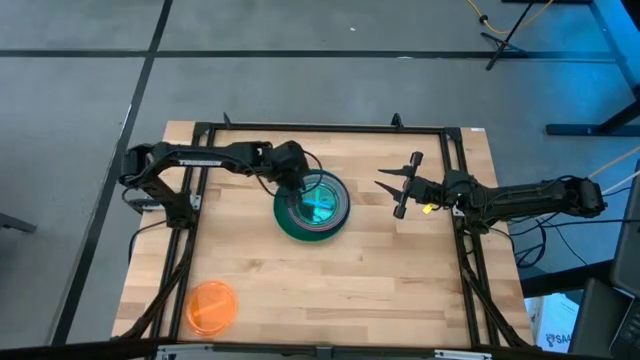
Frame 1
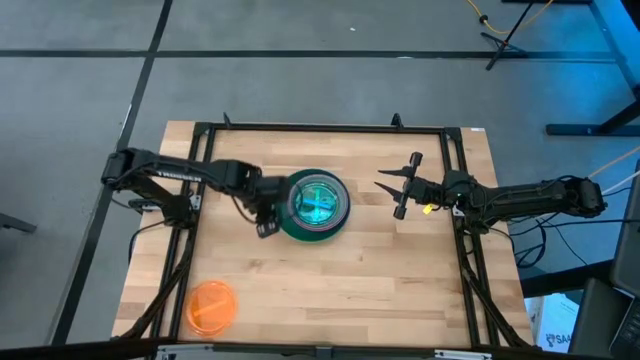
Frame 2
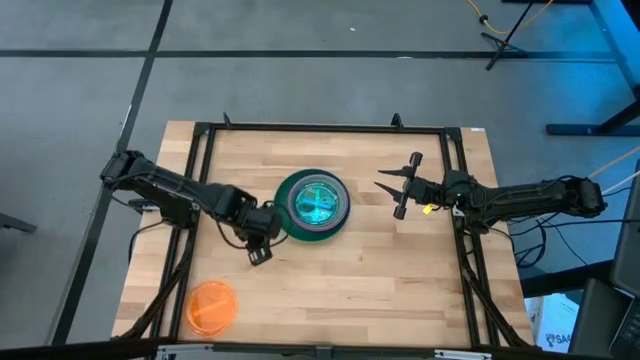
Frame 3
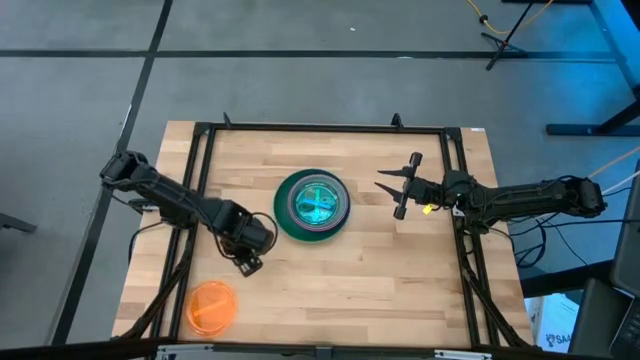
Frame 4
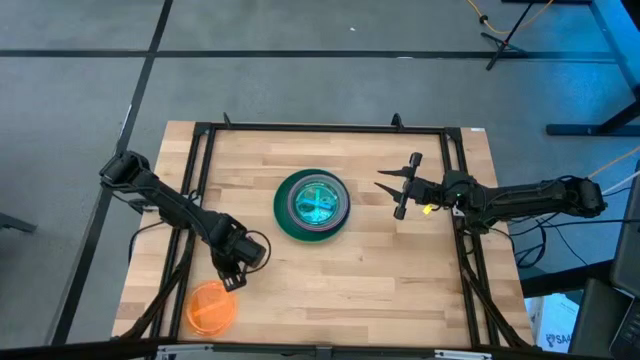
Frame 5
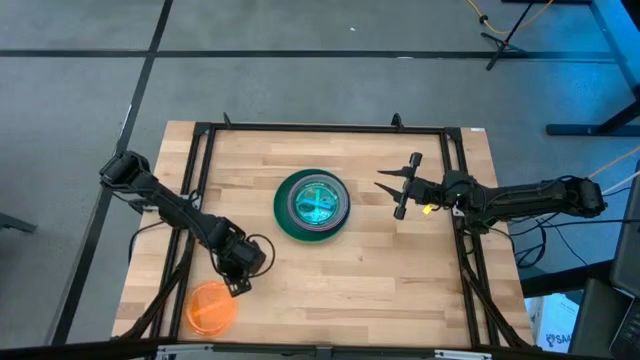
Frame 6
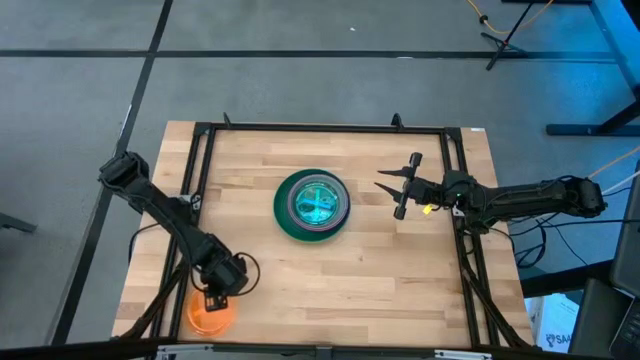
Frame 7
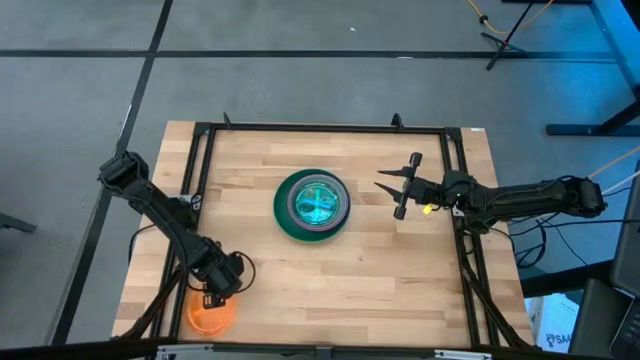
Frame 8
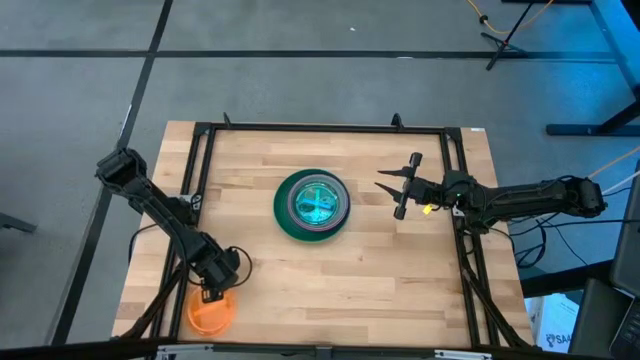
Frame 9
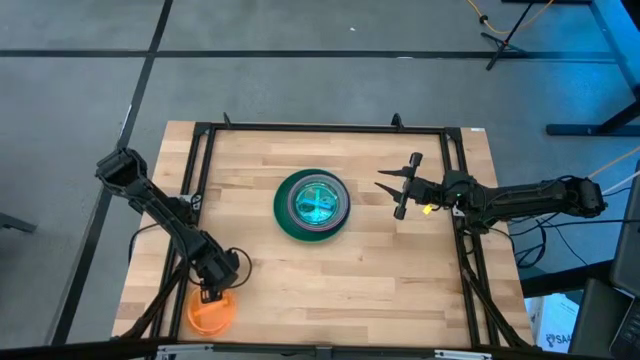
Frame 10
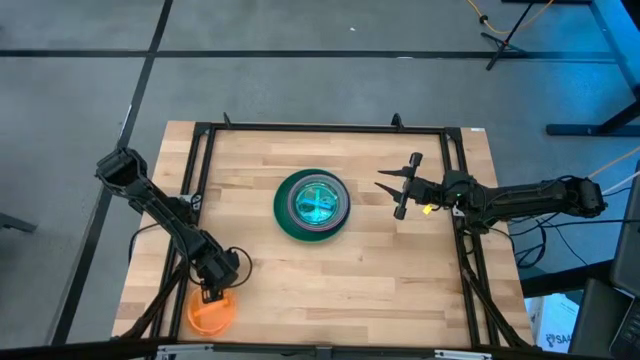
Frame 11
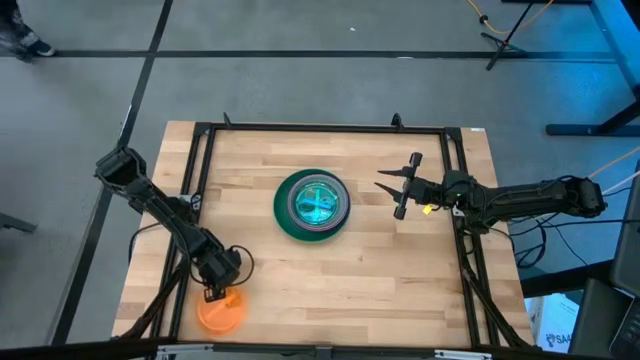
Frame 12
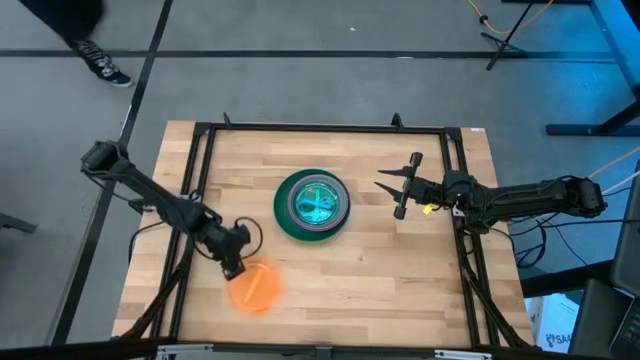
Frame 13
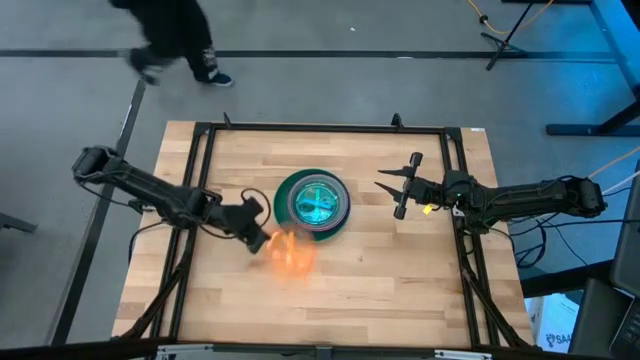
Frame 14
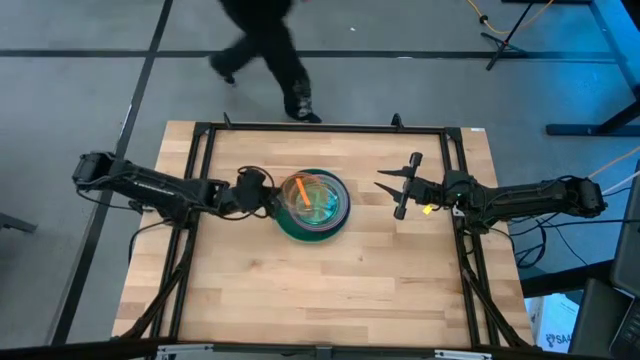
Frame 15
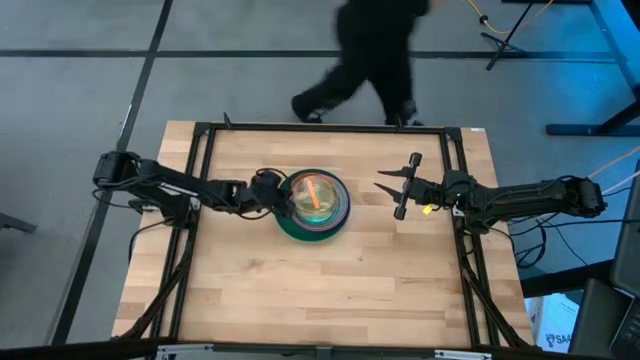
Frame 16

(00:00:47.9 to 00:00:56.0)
Task: Stack plastic plates
Stack the orange plate on top of the light blue plate

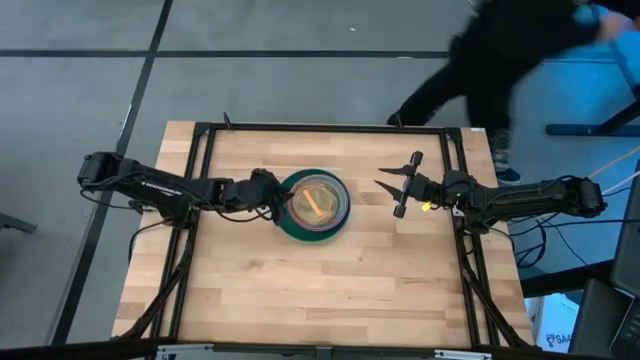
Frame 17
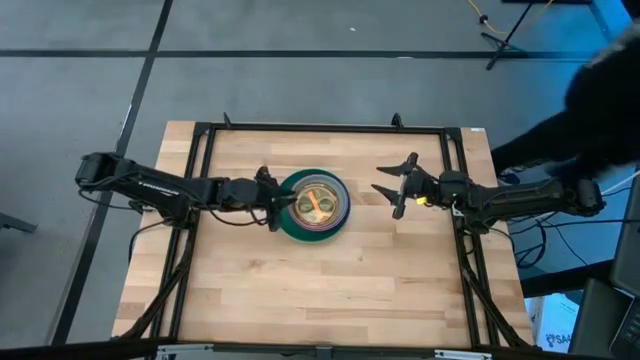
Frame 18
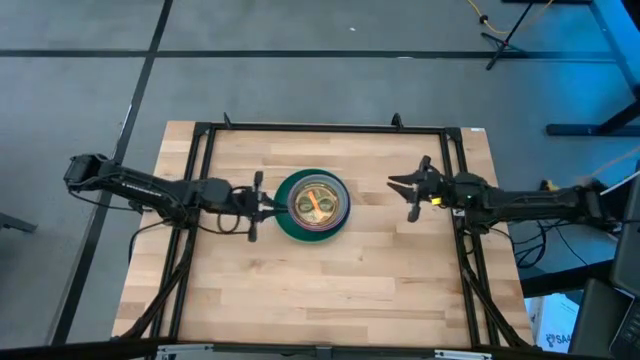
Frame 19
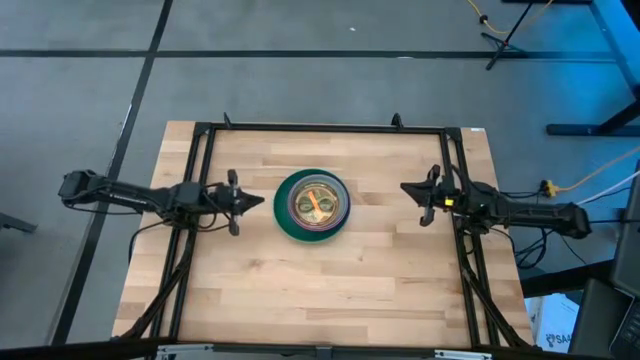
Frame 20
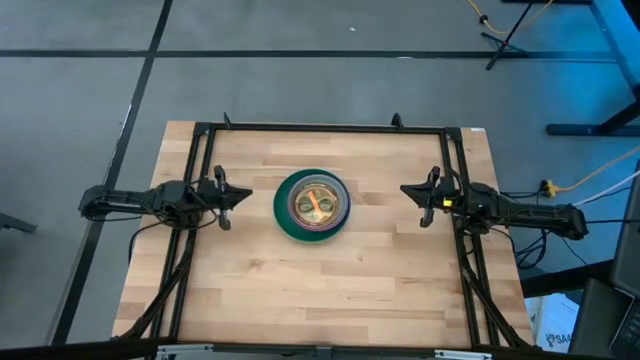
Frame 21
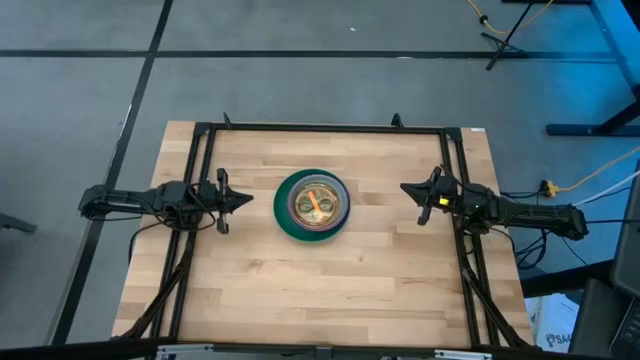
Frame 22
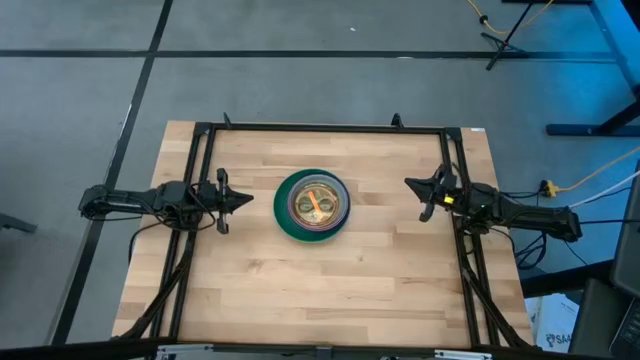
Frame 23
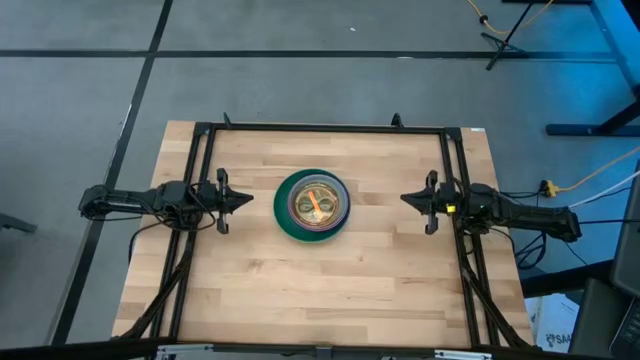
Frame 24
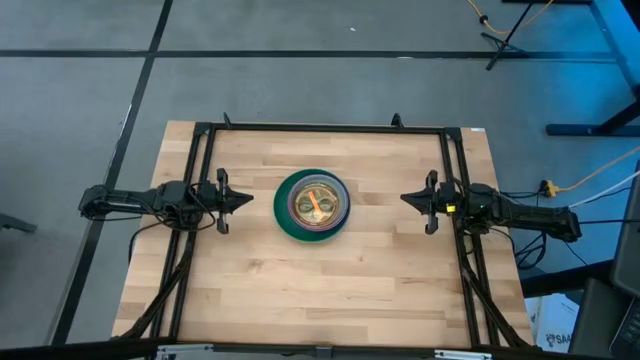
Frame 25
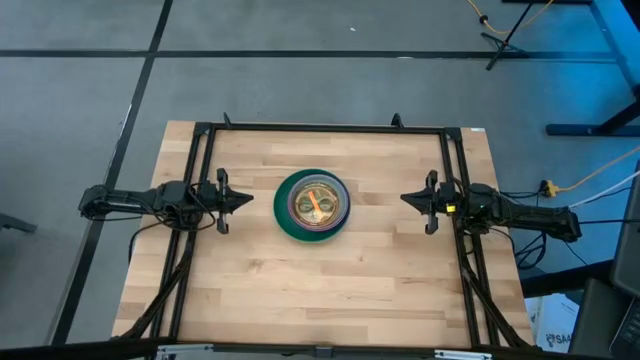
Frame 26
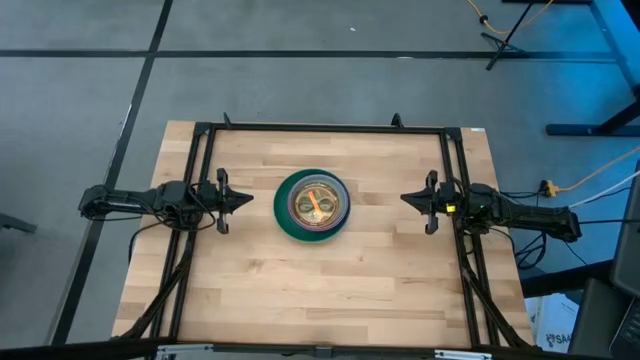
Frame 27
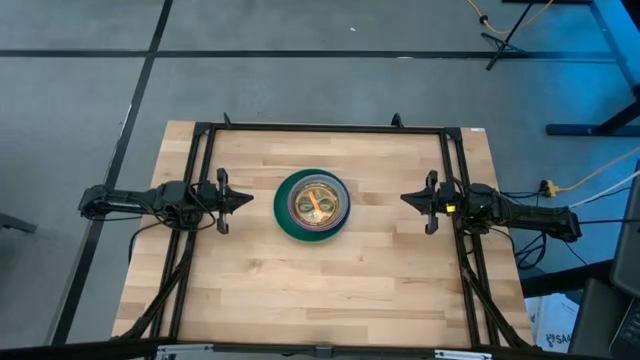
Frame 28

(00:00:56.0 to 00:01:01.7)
Return to Home Position

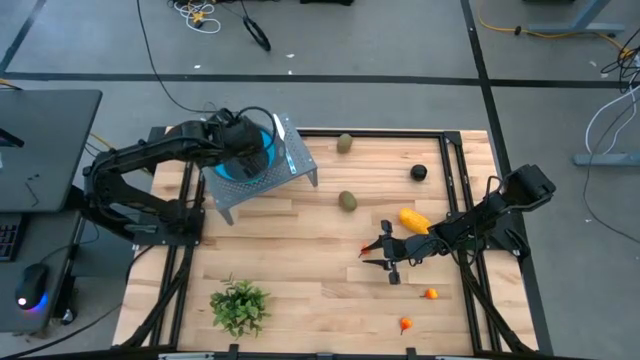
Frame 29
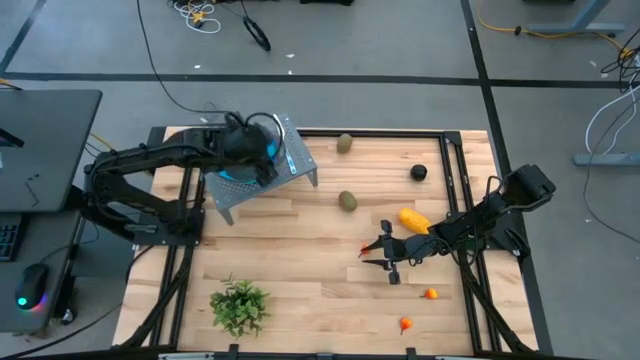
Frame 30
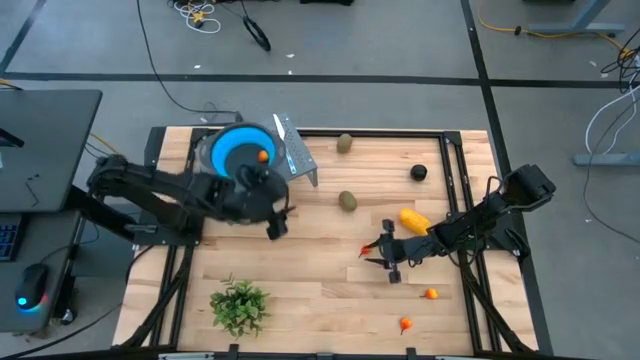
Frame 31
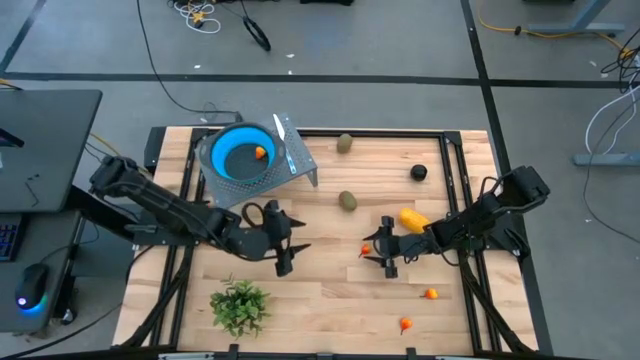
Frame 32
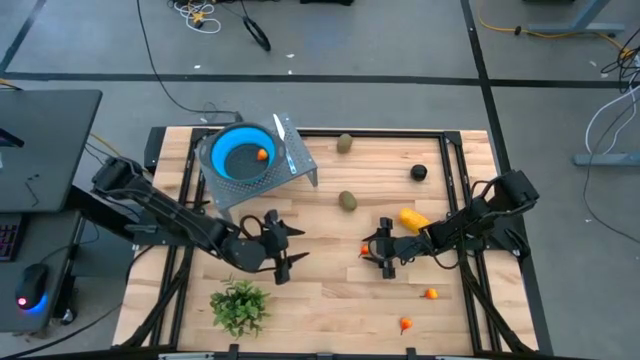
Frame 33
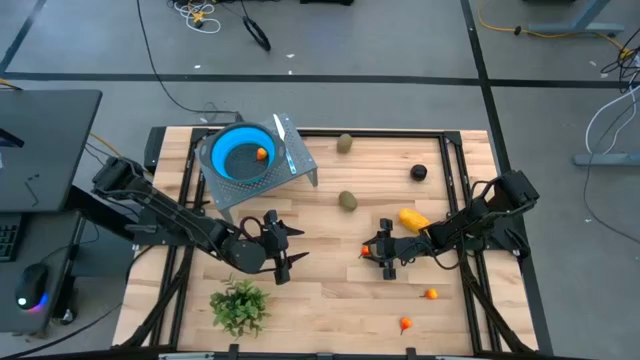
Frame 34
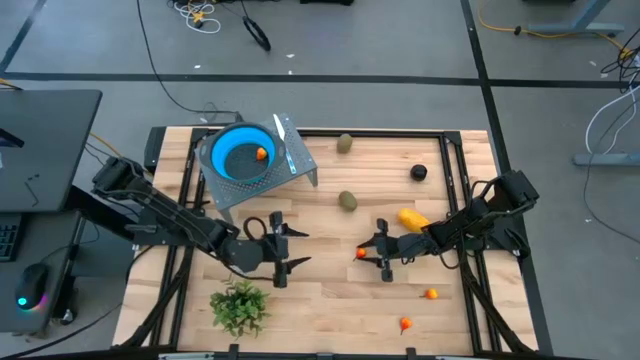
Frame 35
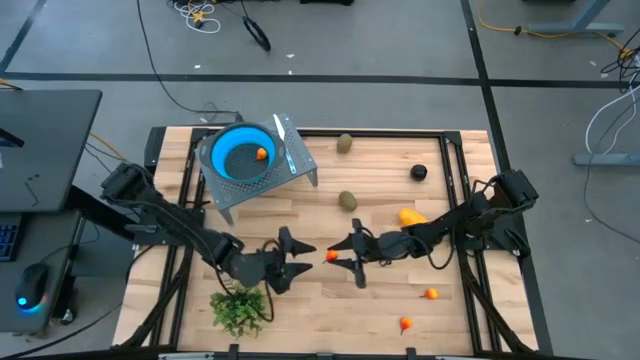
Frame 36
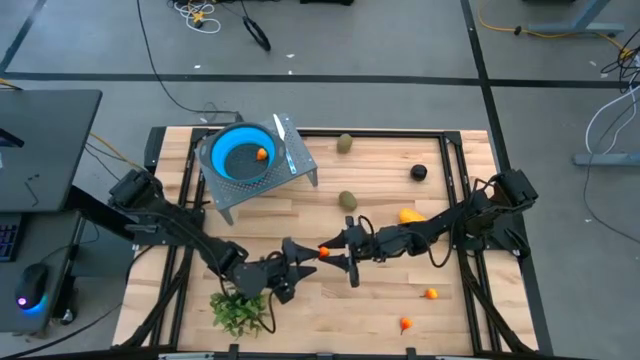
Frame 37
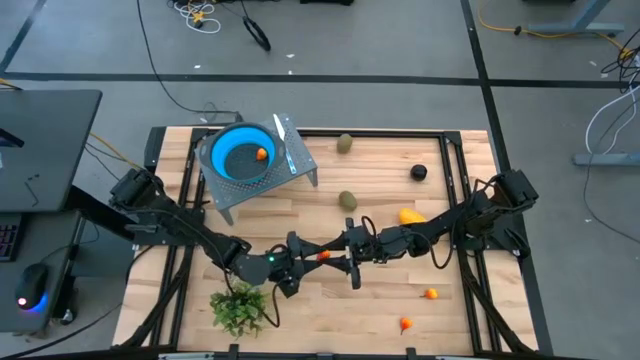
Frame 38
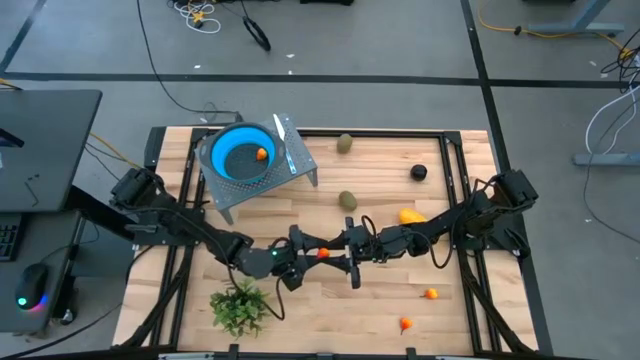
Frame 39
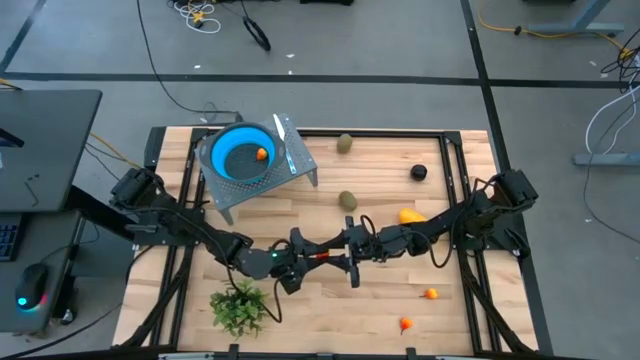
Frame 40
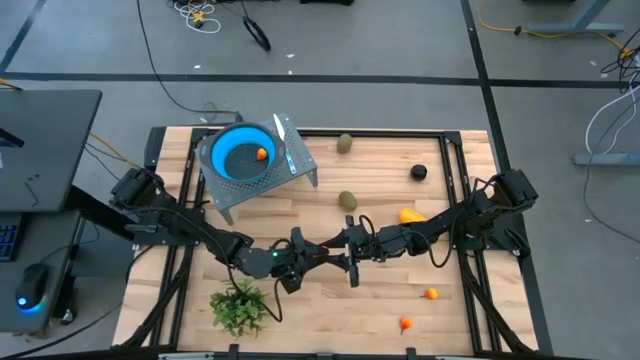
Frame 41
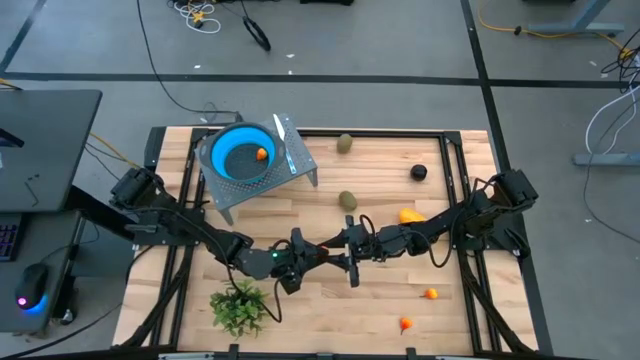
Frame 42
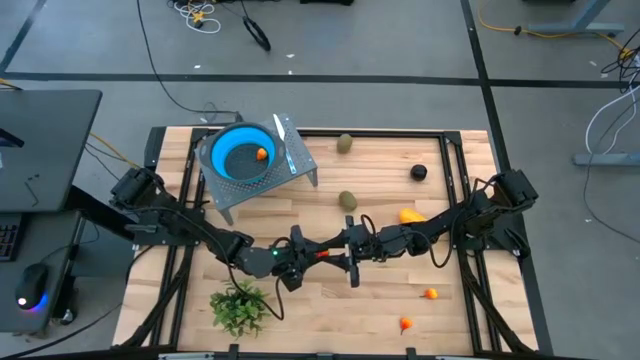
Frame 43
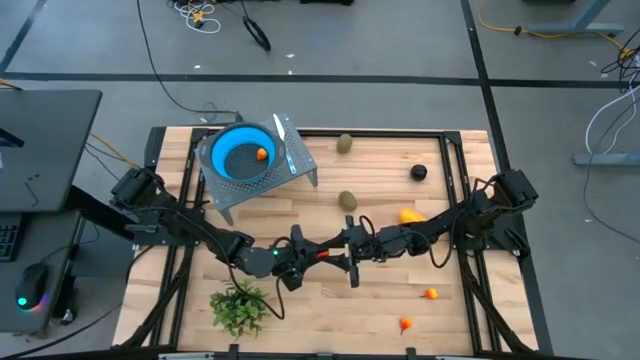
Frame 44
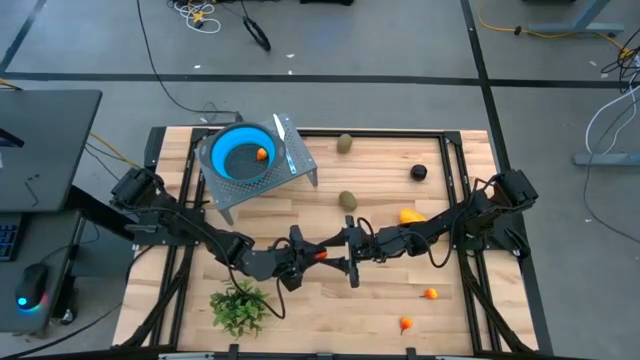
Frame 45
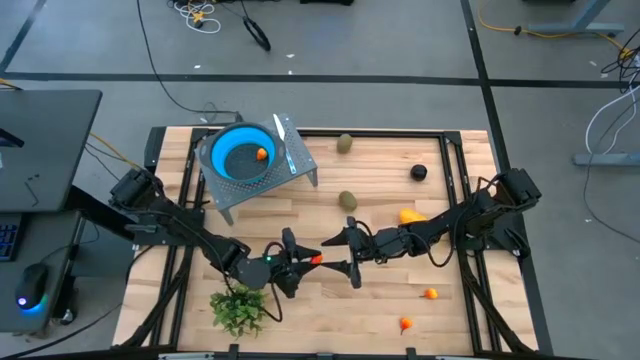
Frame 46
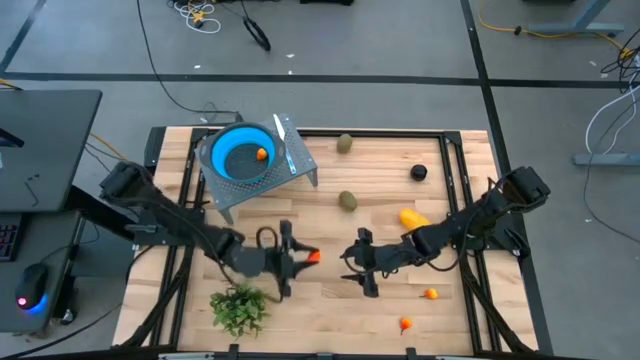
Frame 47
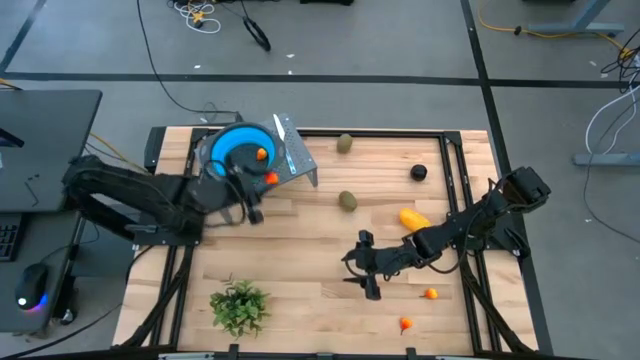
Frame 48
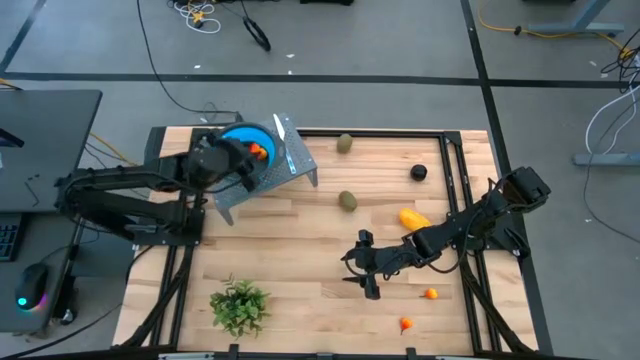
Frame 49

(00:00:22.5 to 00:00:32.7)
Task: Pick & Place Fruit
Put the top orange pear into the blue strainer bowl on the shelf
